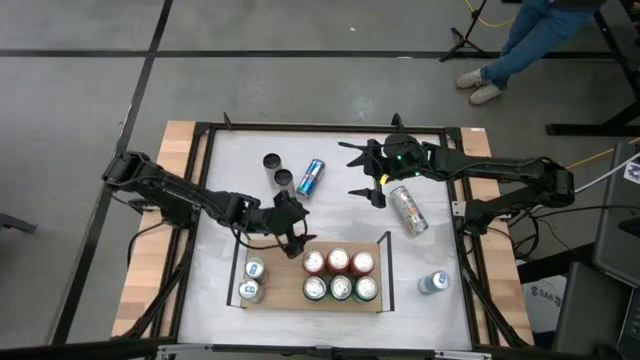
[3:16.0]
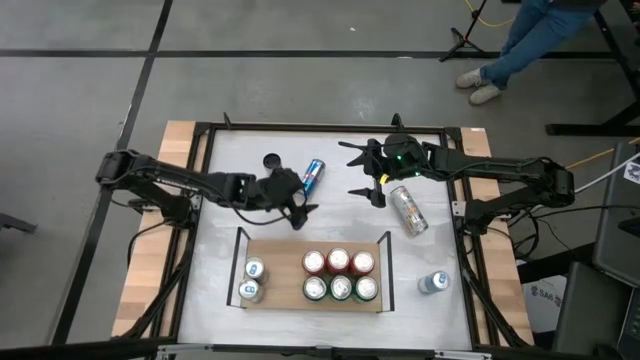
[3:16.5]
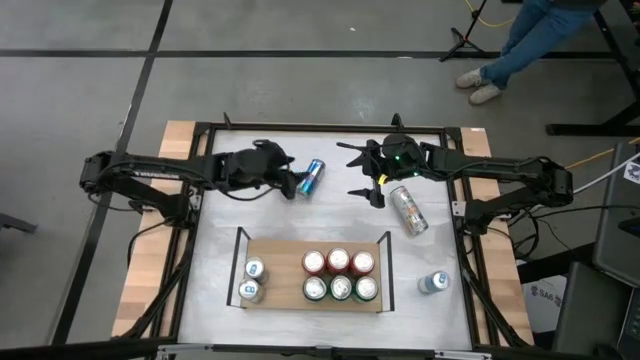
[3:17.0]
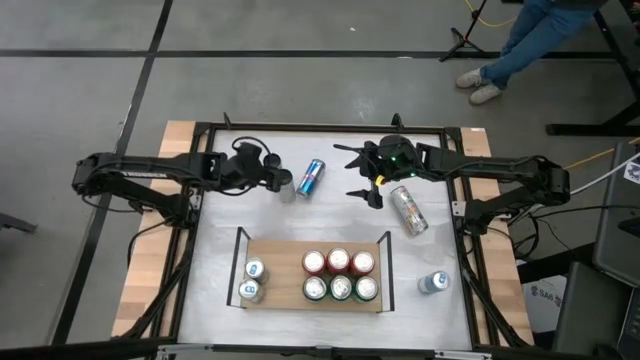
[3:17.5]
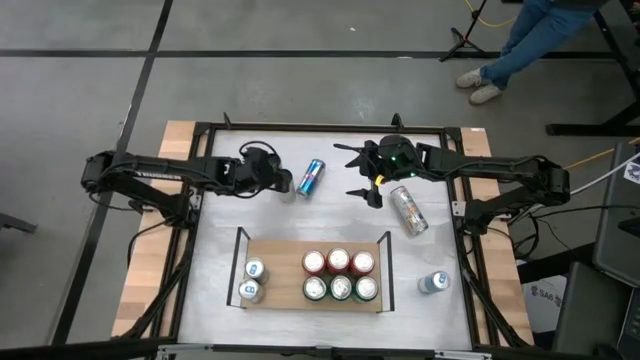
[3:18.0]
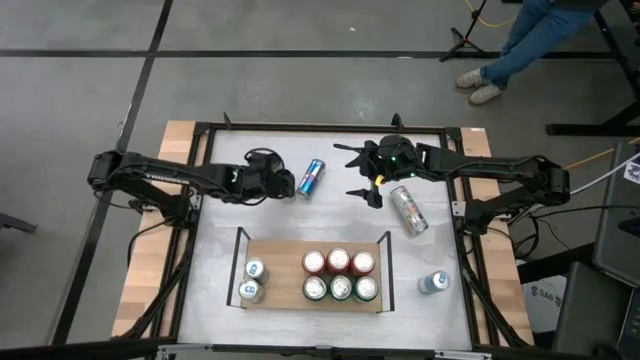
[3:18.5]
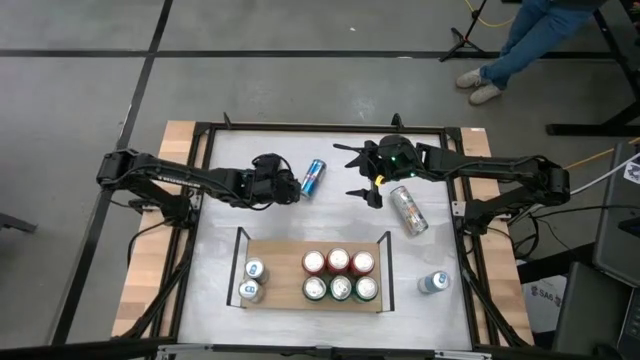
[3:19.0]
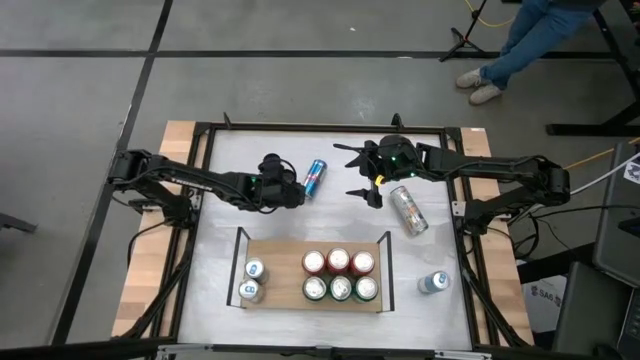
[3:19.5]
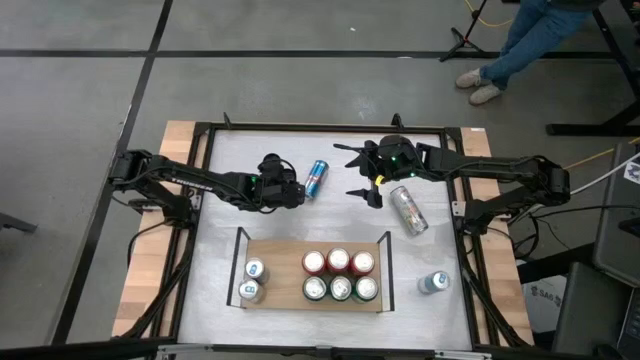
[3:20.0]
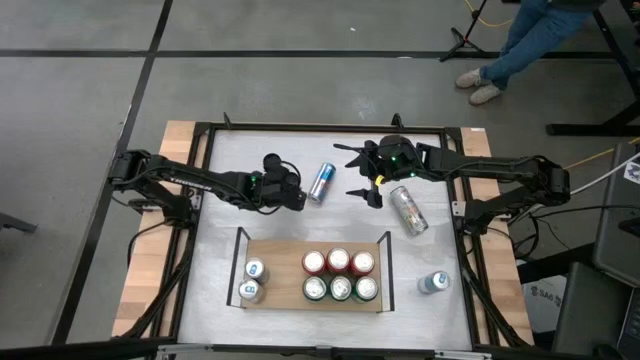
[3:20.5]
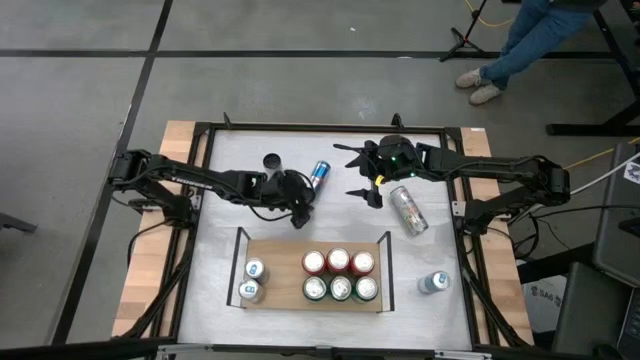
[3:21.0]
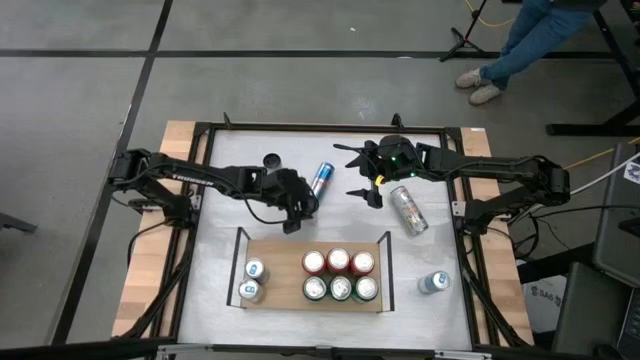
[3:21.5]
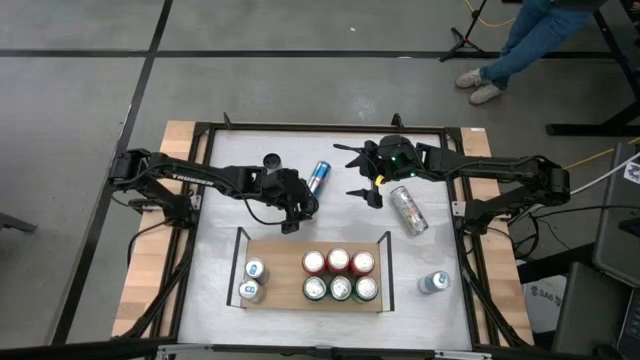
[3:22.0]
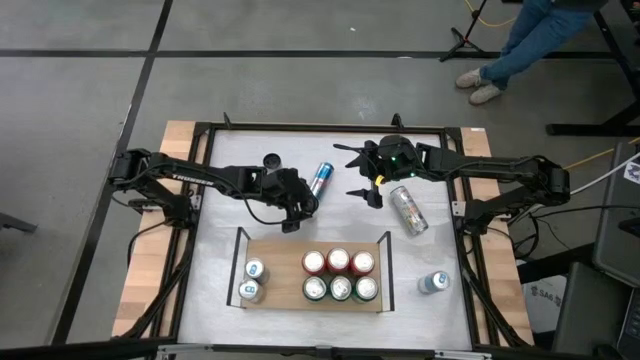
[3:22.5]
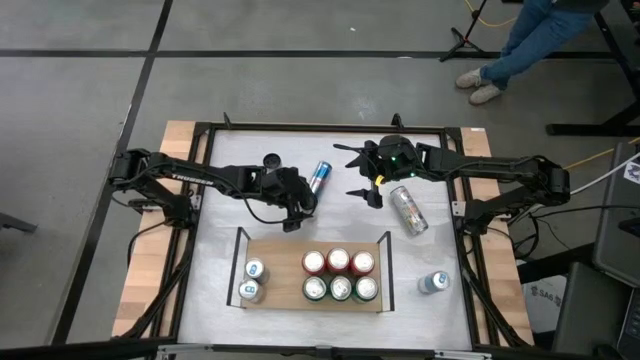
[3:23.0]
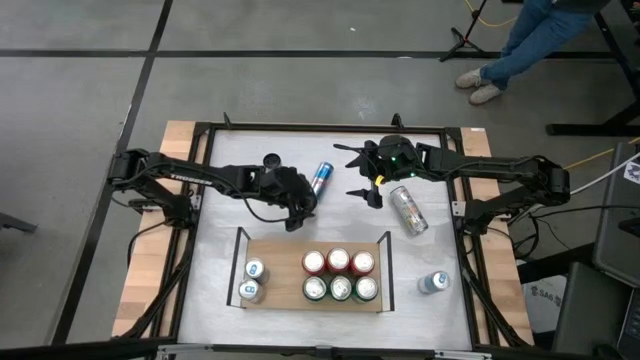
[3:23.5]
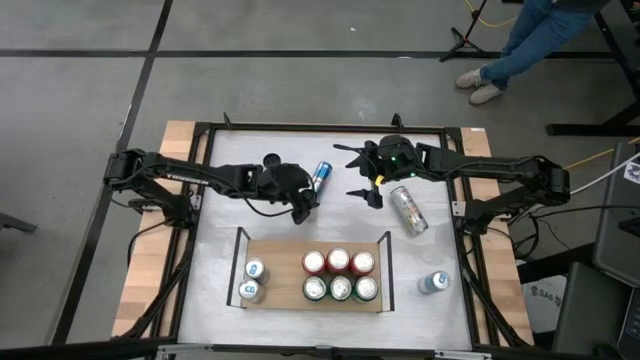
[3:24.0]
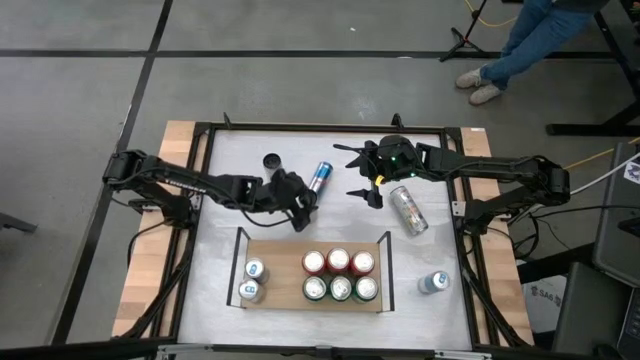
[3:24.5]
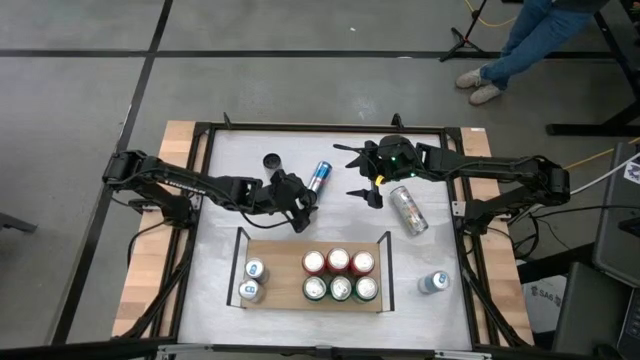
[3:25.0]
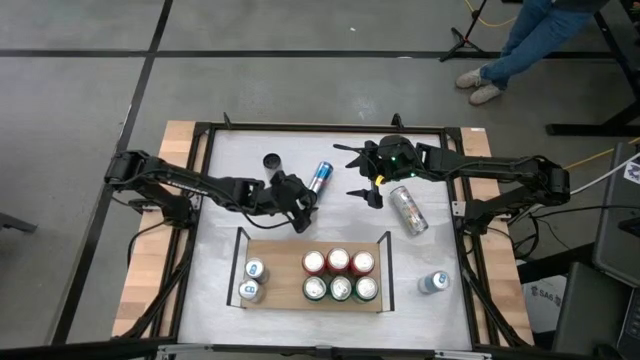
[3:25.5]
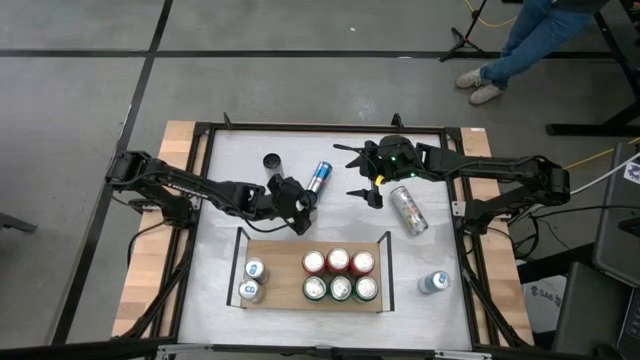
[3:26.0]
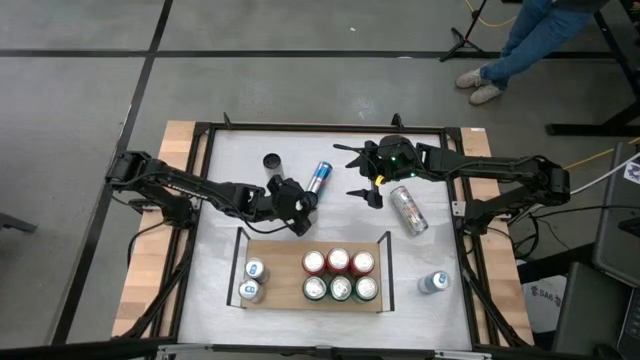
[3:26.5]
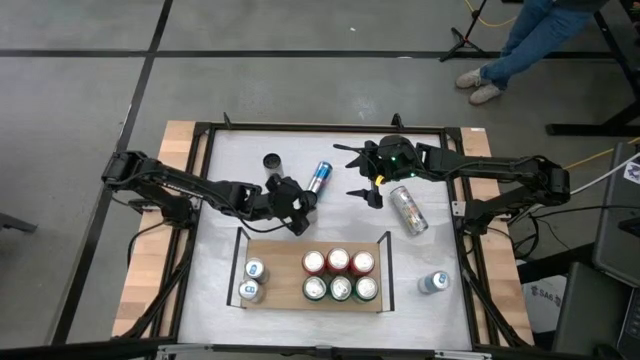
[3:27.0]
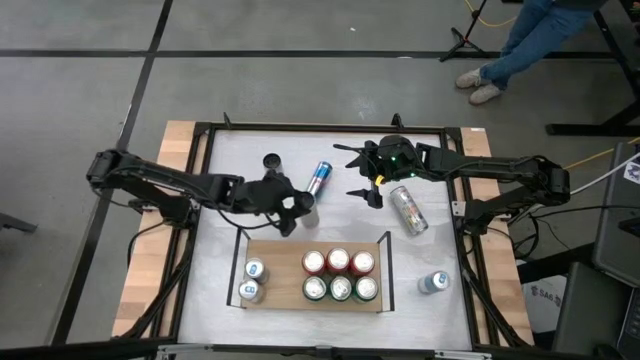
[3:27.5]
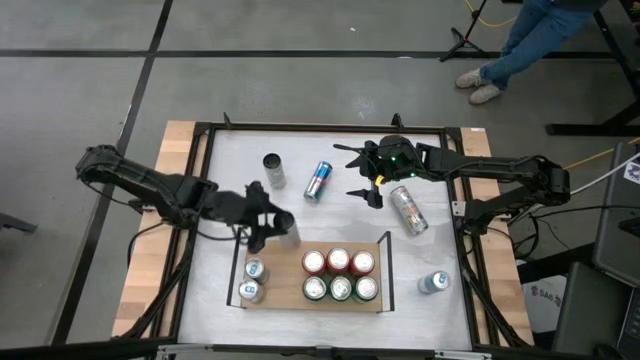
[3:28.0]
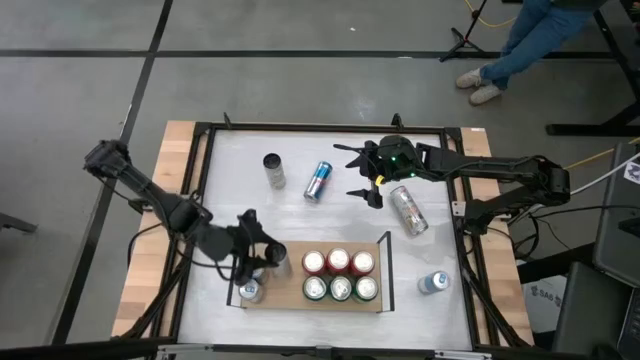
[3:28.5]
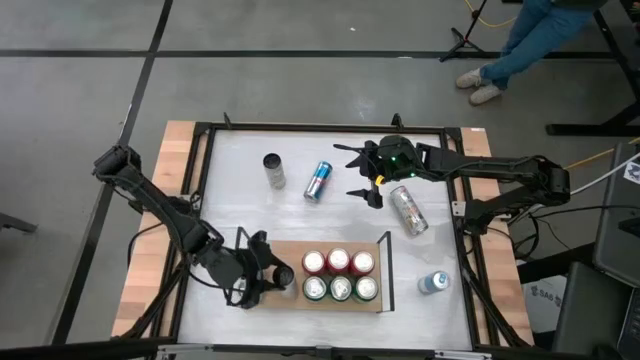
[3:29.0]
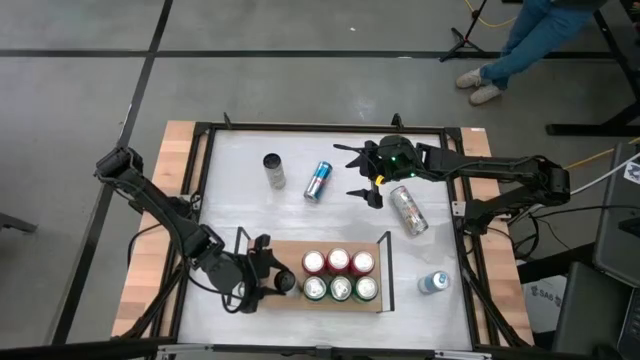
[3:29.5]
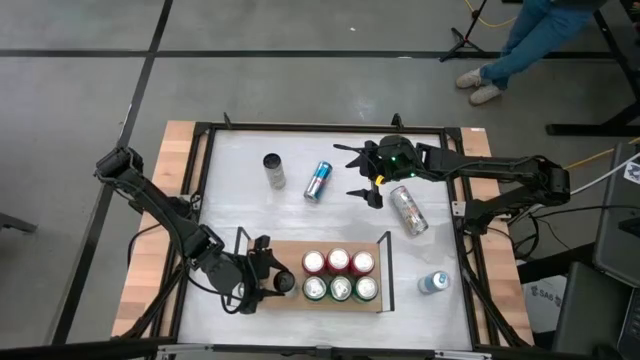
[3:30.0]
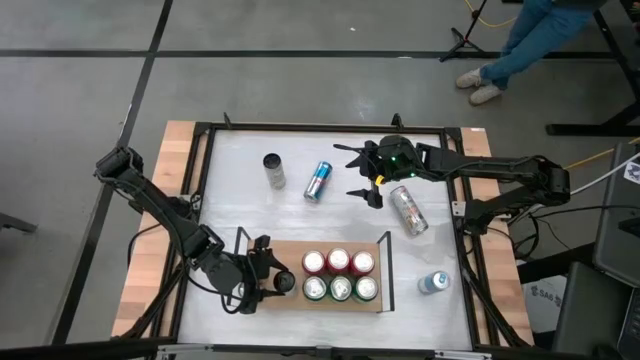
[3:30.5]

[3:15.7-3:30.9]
Task: Place canned beverage on shelf
Put the middle white yellow soda can on the shelf

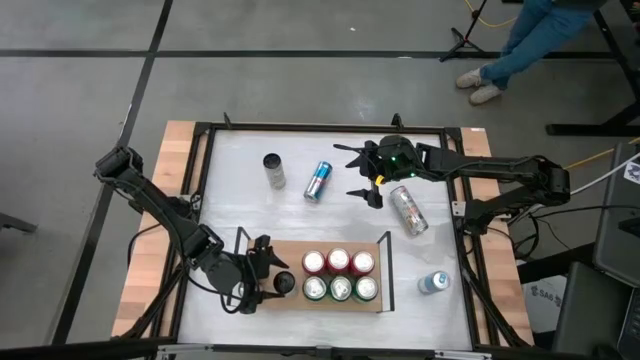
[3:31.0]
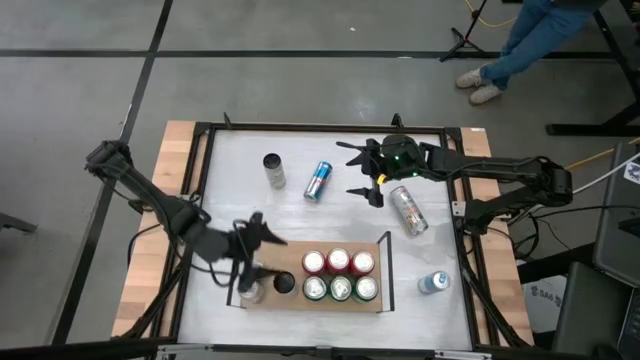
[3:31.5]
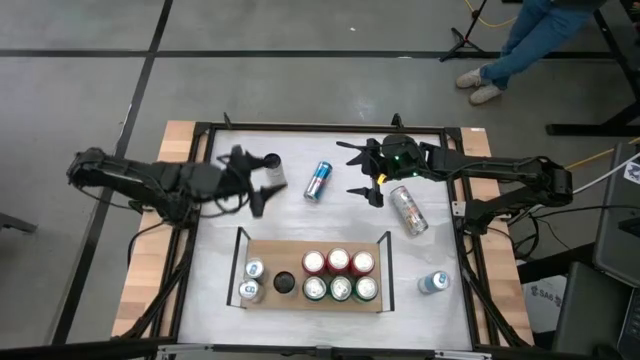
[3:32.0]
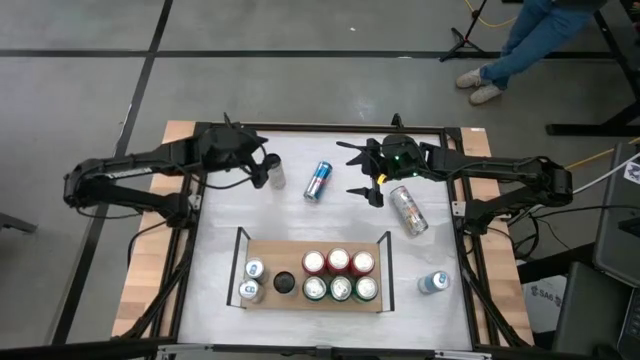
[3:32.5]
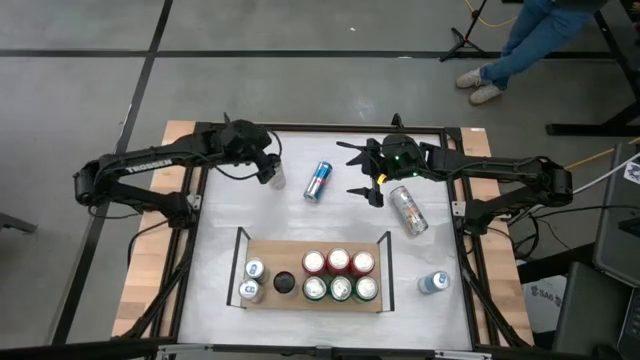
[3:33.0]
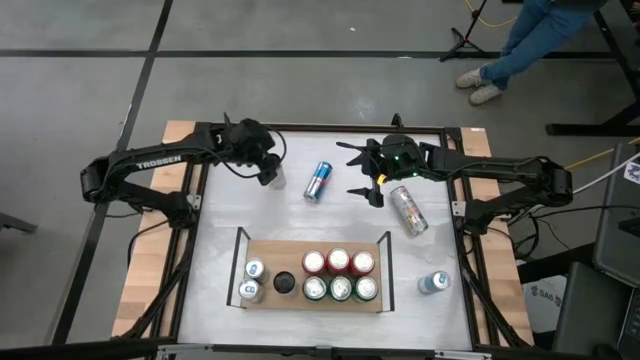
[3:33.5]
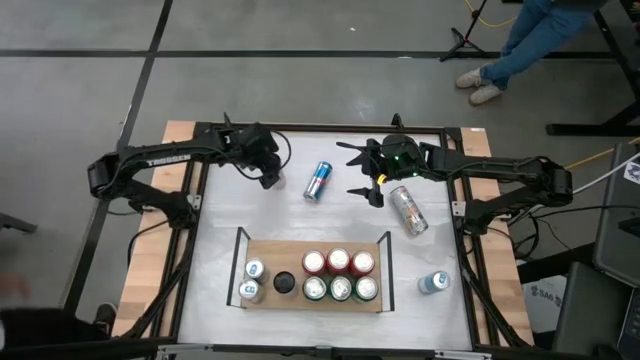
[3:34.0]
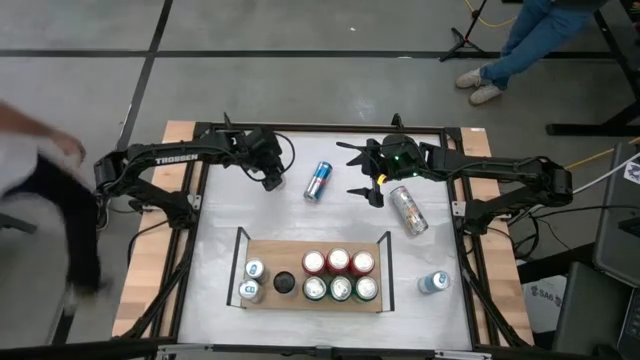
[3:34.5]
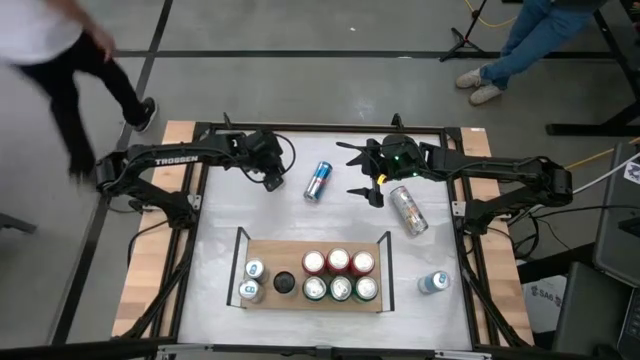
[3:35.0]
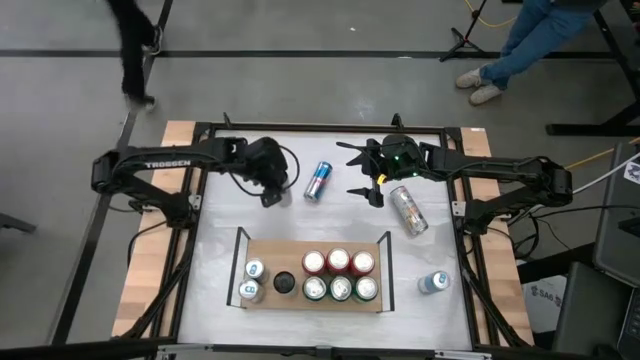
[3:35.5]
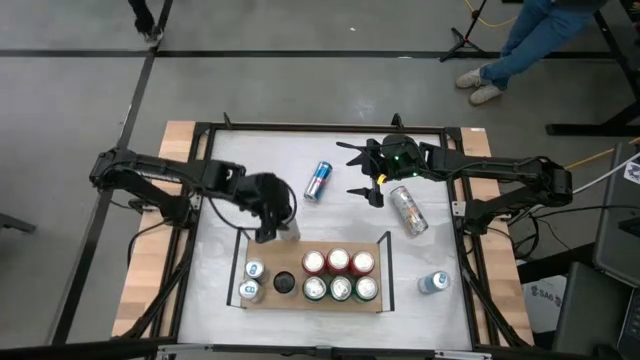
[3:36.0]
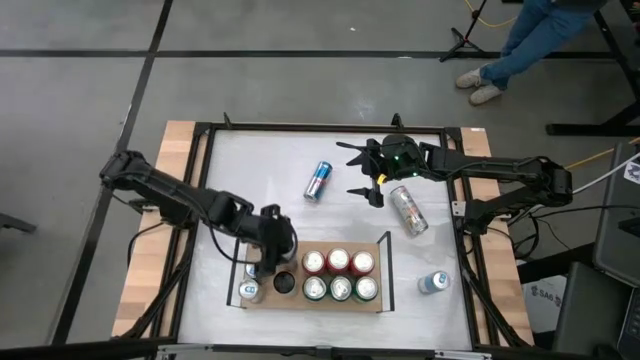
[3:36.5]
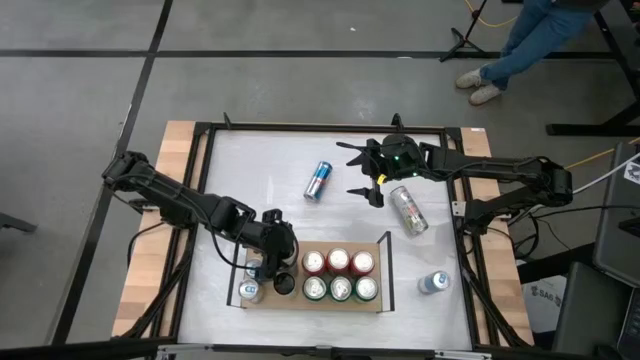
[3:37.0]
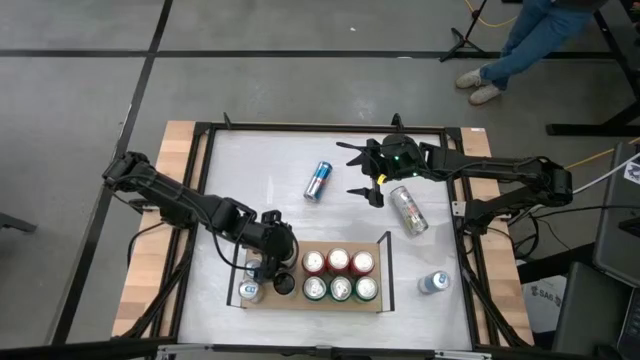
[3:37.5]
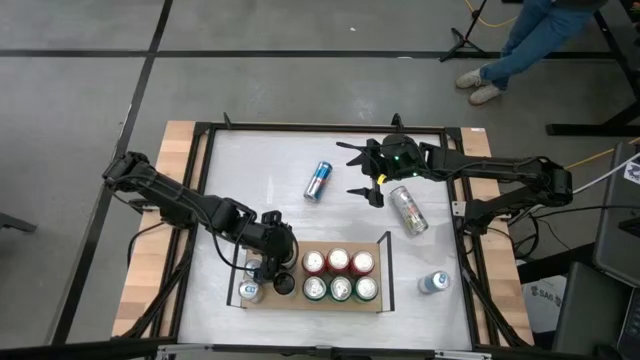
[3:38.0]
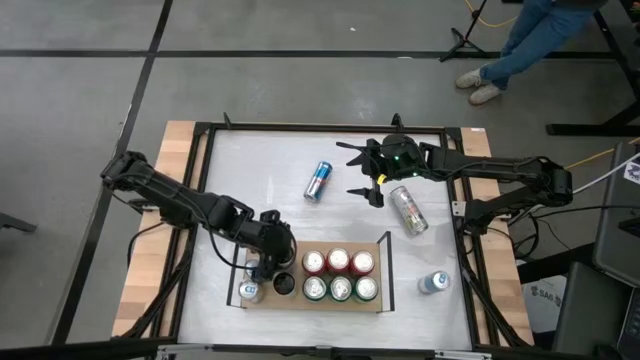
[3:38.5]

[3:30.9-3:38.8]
Put the top white yellow soda can on the shelf aligned with the other white yellow soda can
